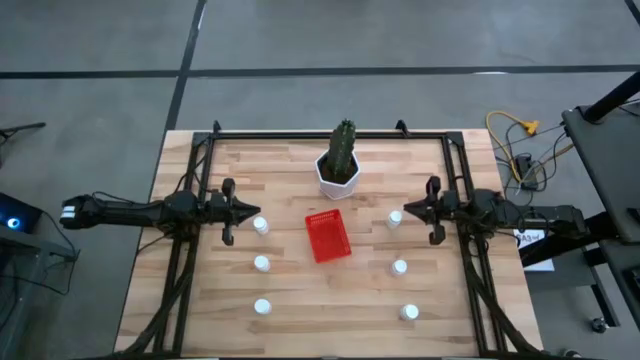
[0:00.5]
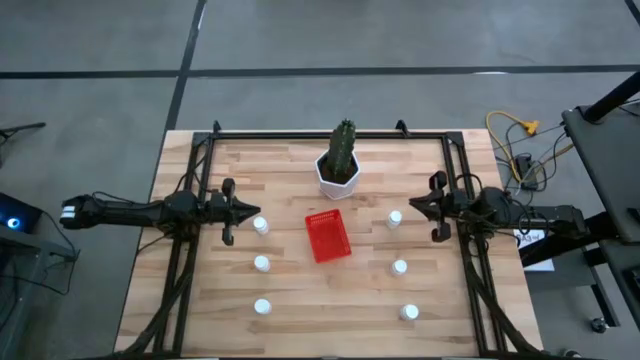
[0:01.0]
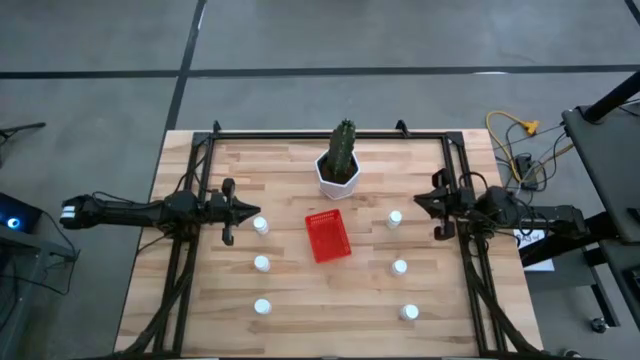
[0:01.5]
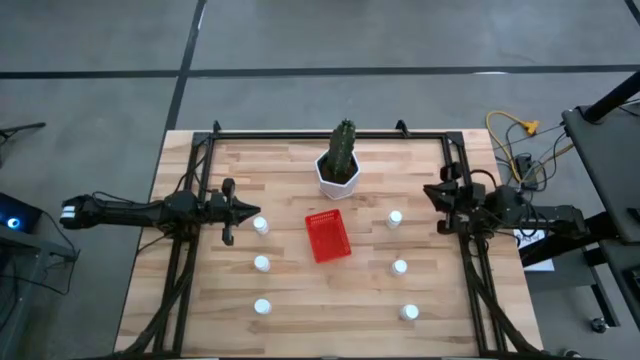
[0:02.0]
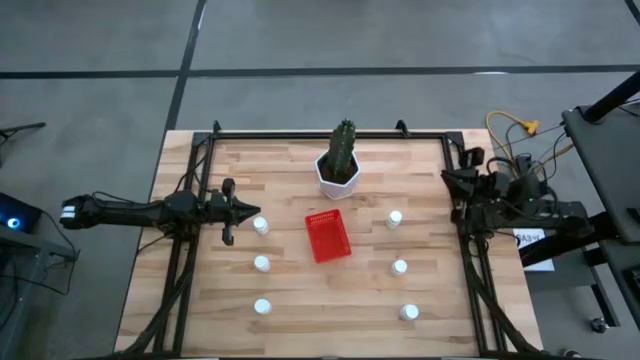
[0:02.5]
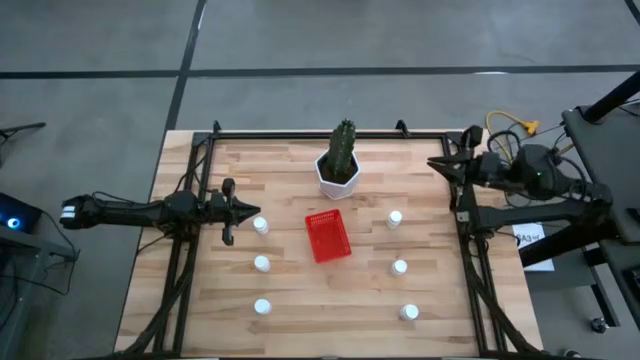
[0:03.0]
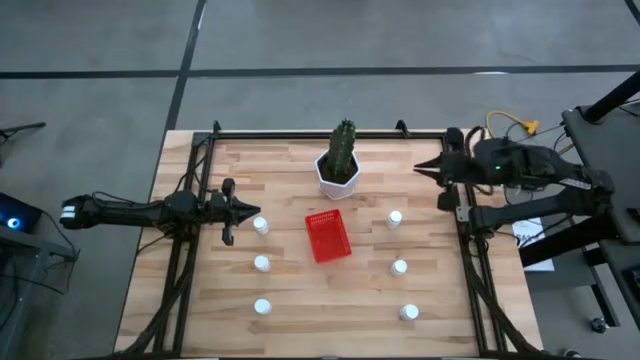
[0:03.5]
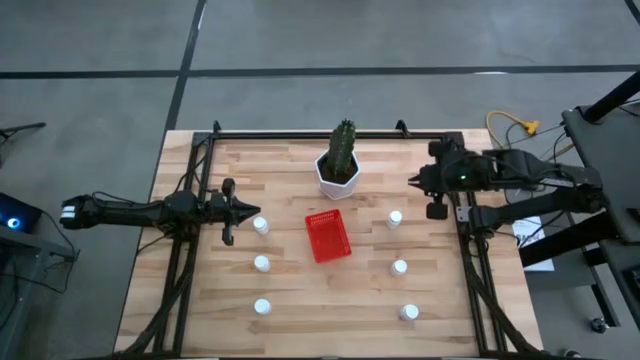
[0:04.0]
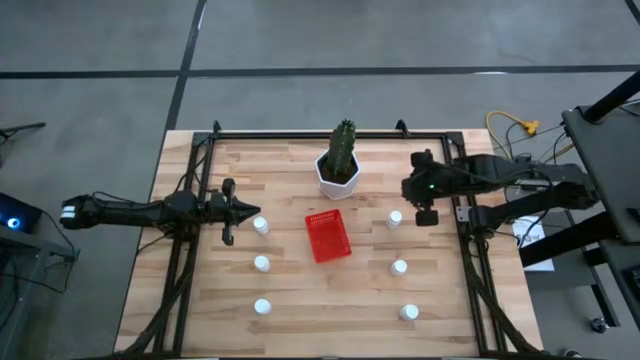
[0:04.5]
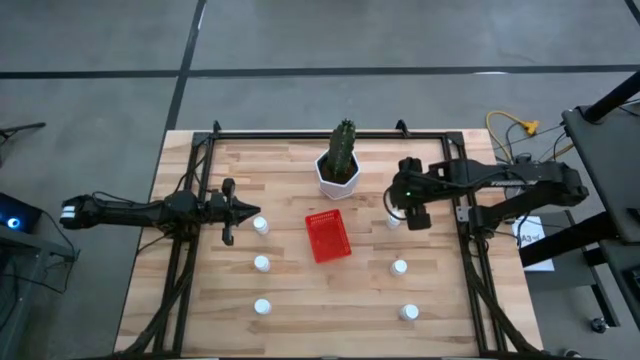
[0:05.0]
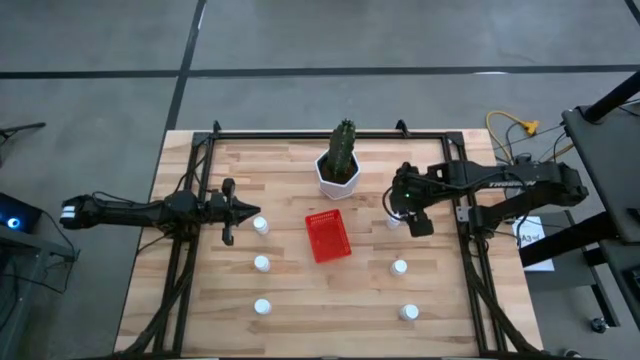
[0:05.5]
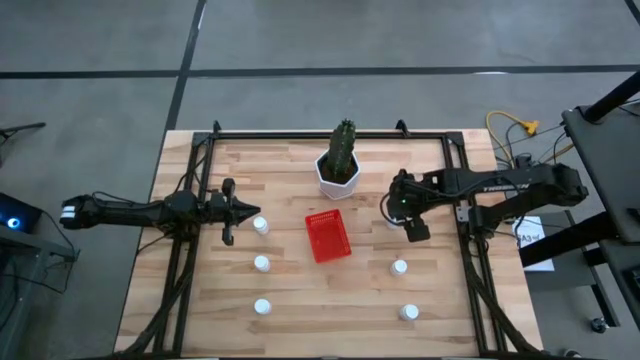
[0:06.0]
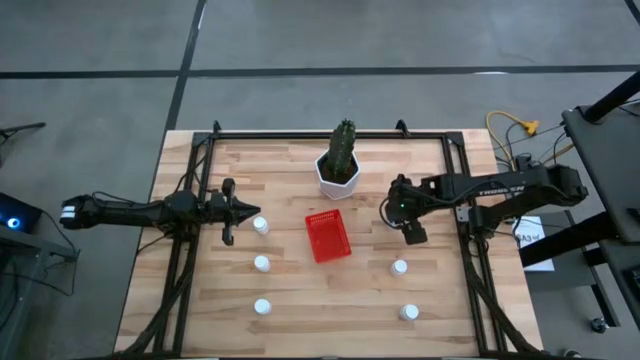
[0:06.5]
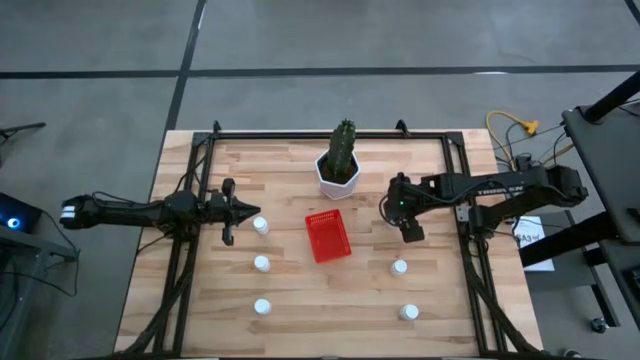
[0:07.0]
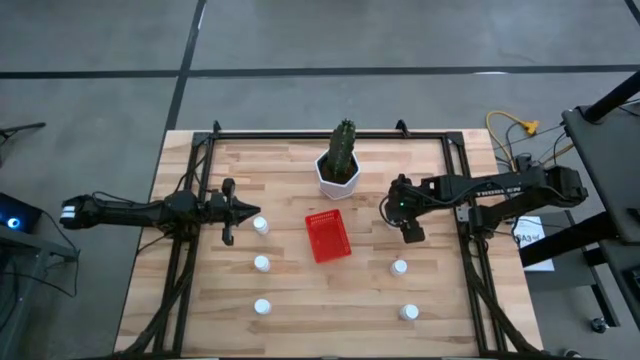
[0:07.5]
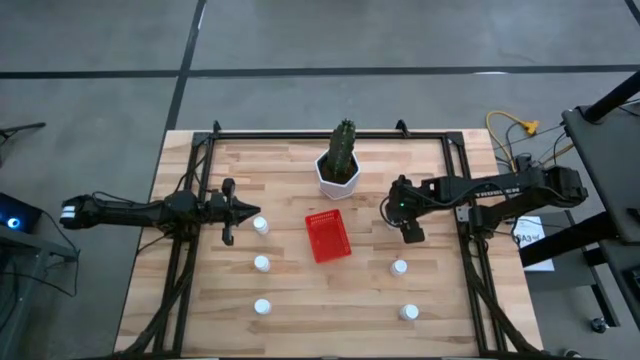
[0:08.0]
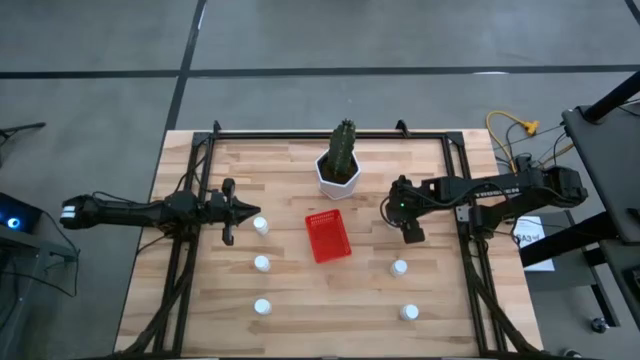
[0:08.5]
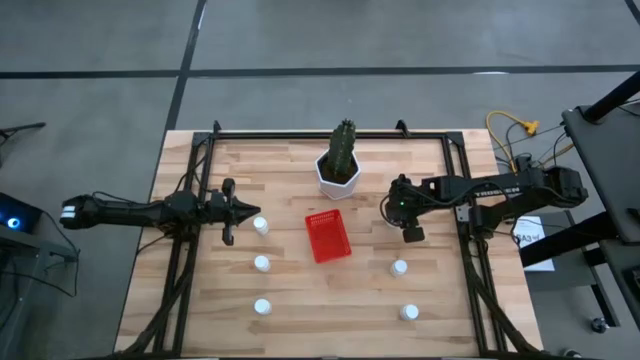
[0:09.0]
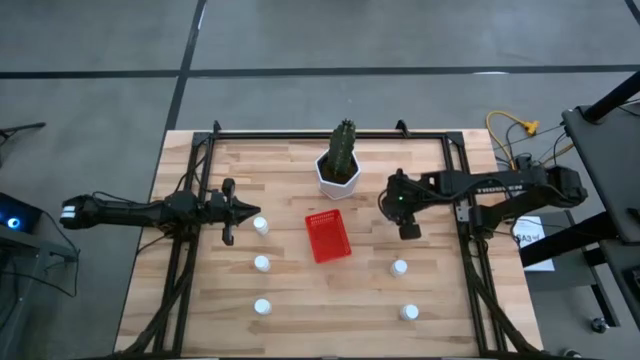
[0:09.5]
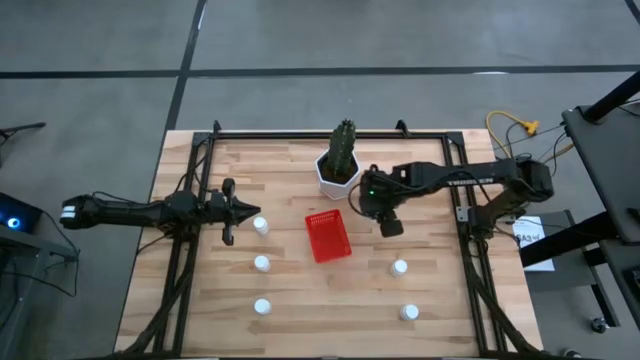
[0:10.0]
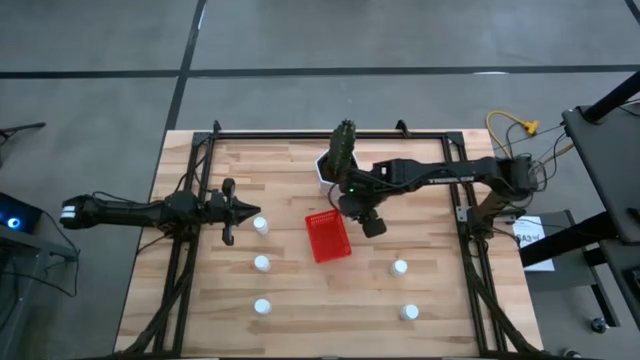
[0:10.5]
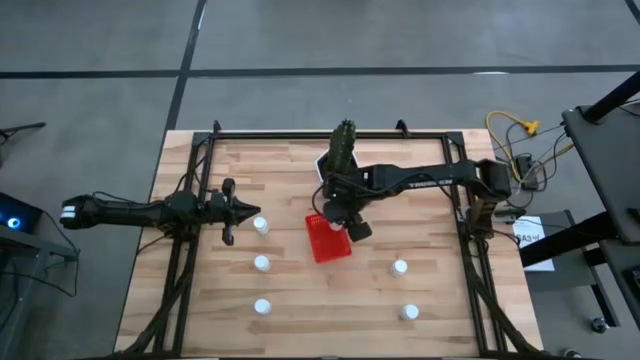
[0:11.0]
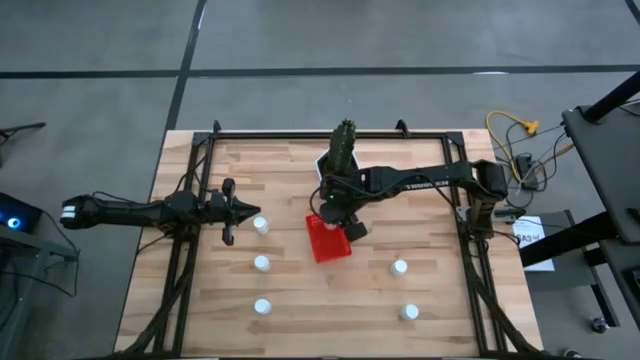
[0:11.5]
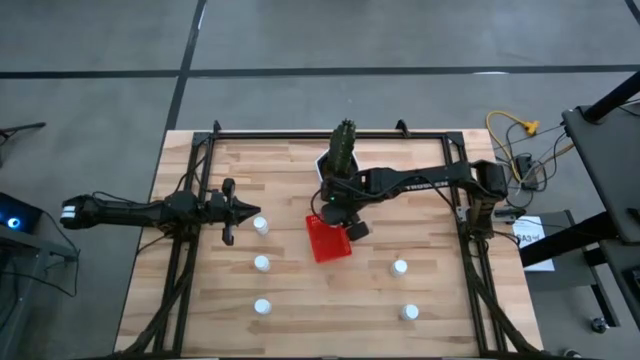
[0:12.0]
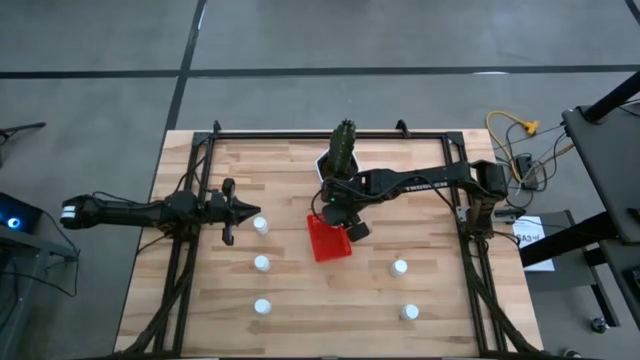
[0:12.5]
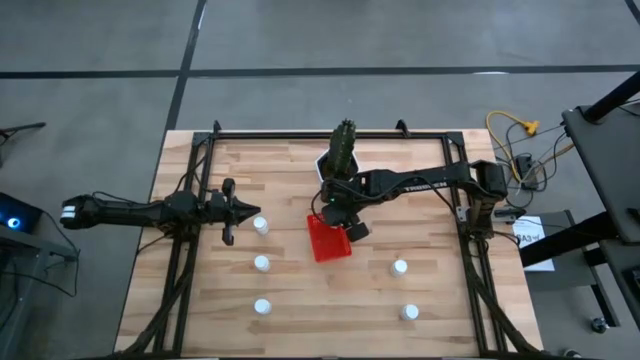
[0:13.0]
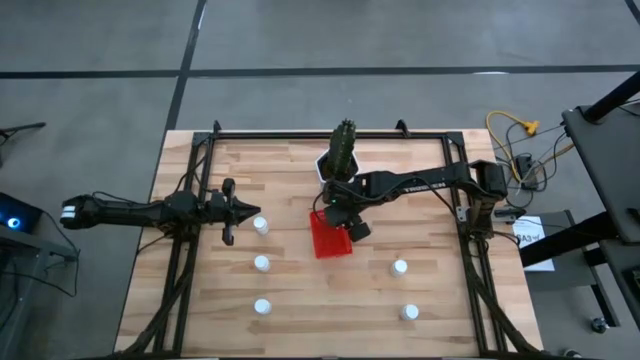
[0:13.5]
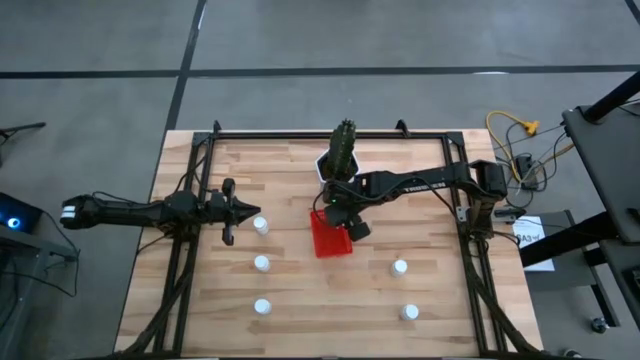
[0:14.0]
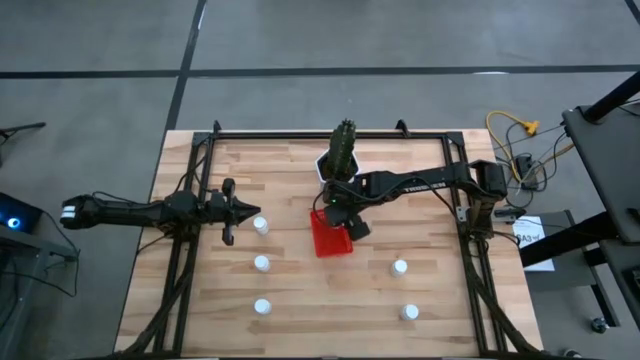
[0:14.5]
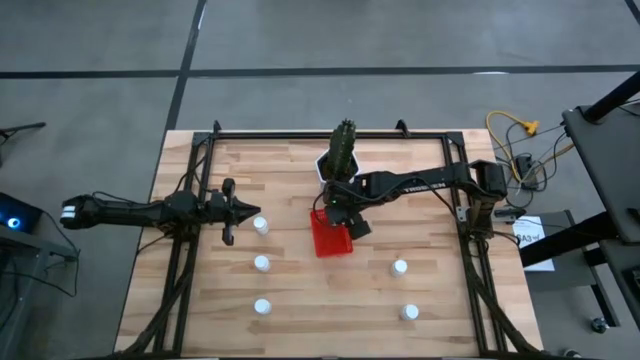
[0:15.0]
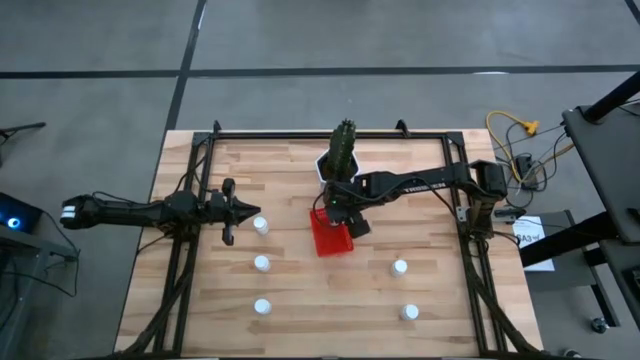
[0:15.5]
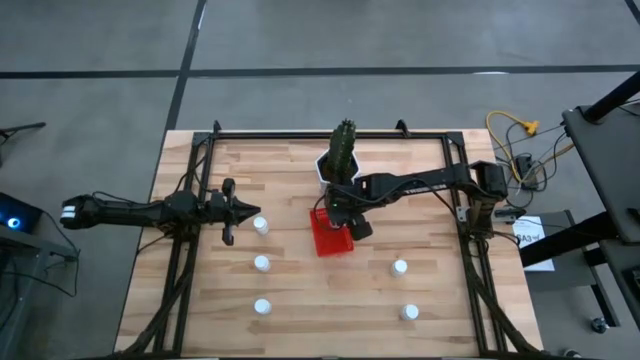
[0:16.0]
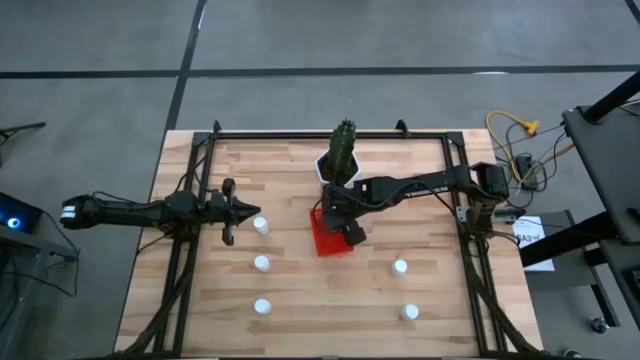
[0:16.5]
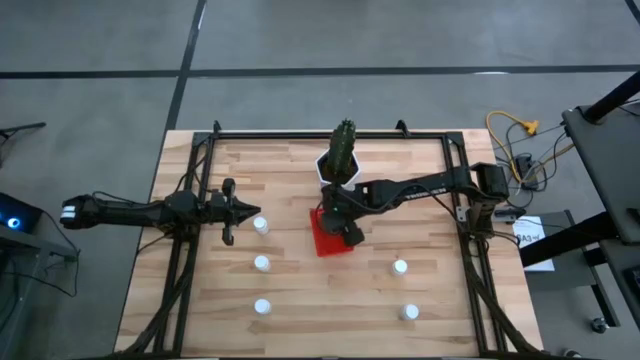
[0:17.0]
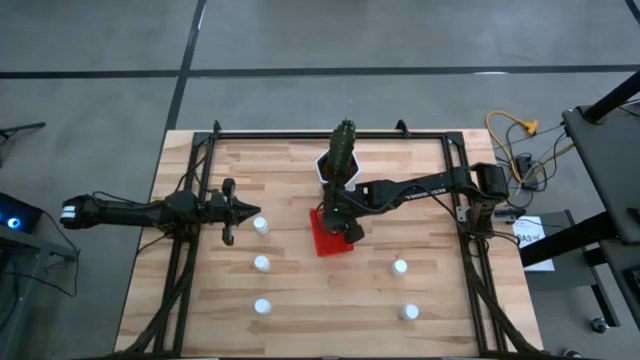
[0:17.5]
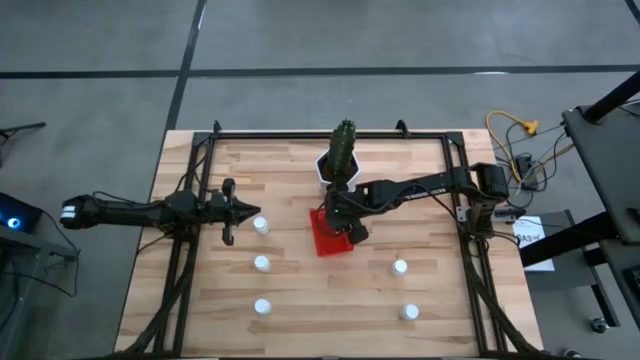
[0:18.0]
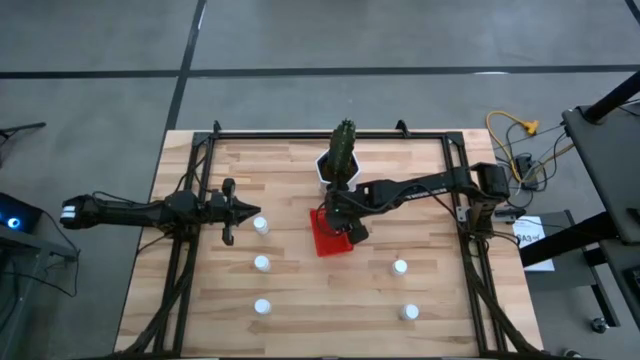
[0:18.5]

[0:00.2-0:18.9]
Task: Pick and place pill bottles into a basket
Put the white pill bottle into the red bin
